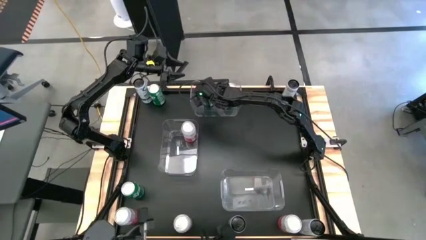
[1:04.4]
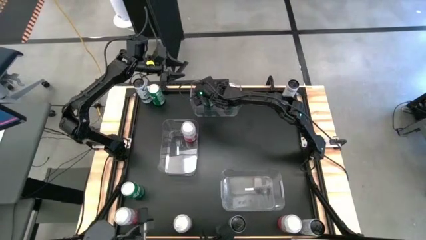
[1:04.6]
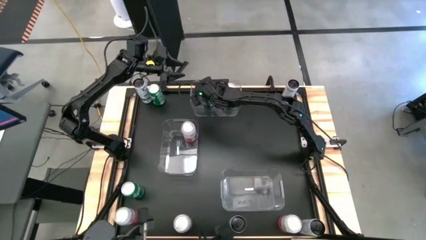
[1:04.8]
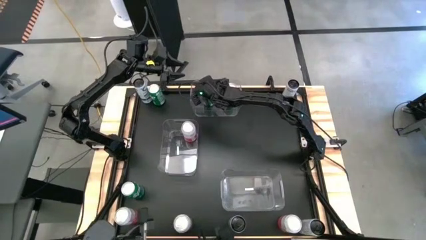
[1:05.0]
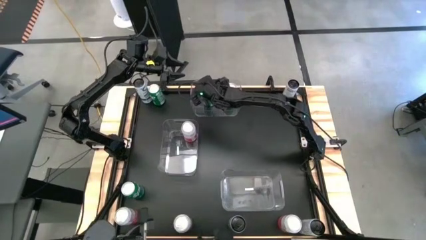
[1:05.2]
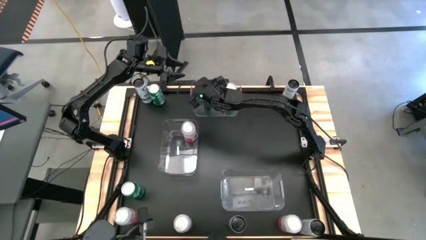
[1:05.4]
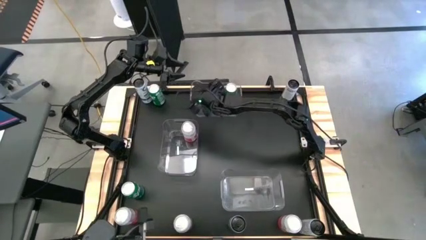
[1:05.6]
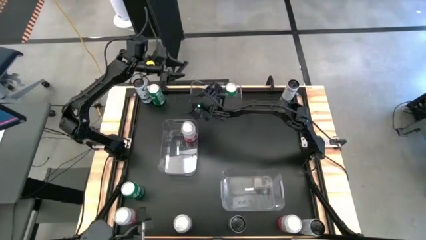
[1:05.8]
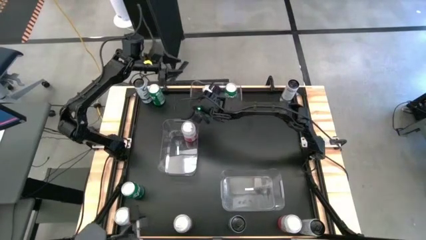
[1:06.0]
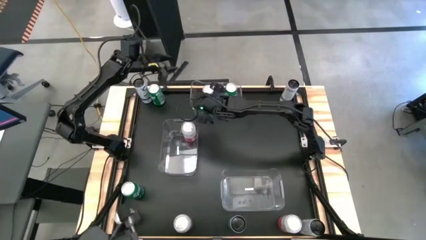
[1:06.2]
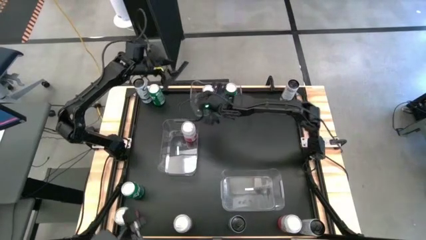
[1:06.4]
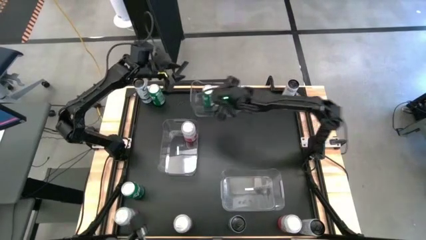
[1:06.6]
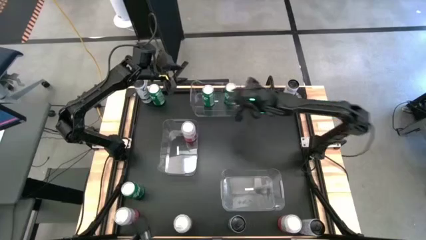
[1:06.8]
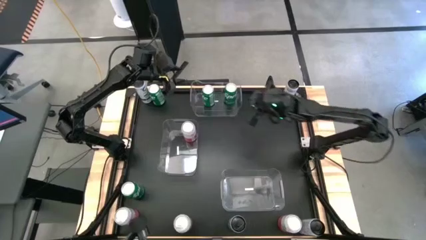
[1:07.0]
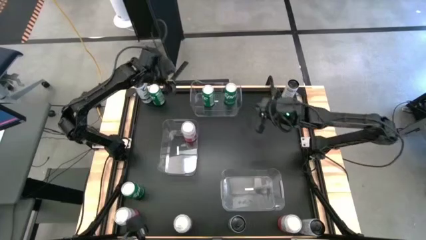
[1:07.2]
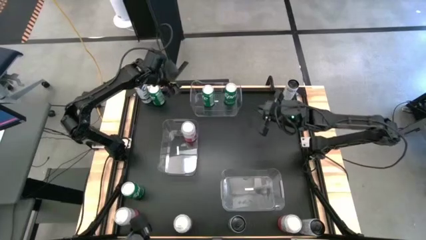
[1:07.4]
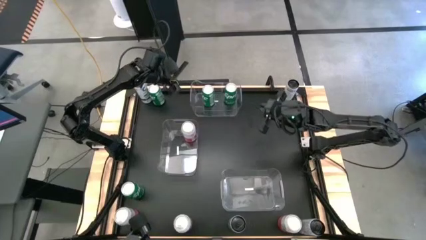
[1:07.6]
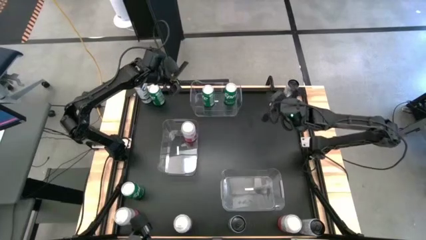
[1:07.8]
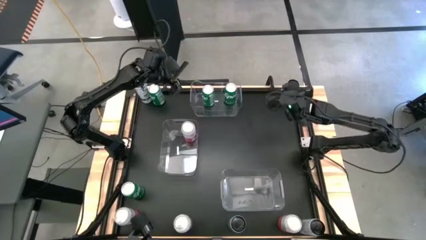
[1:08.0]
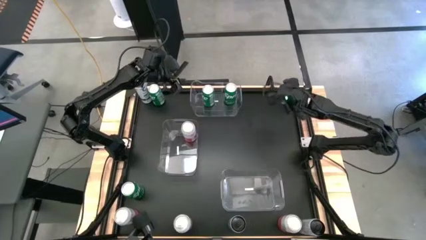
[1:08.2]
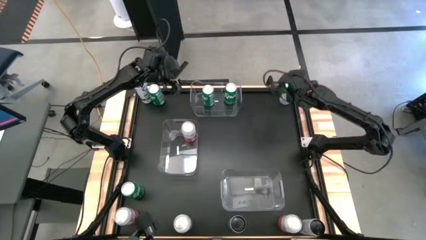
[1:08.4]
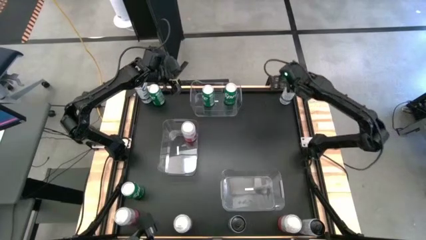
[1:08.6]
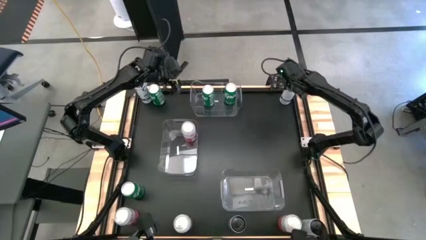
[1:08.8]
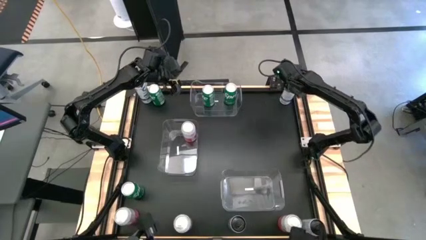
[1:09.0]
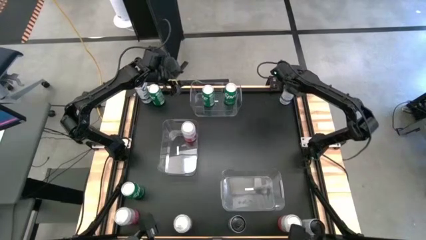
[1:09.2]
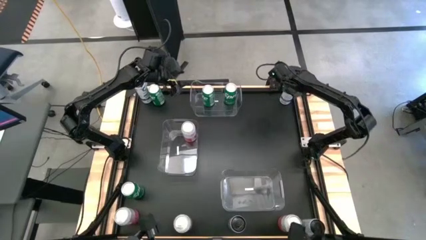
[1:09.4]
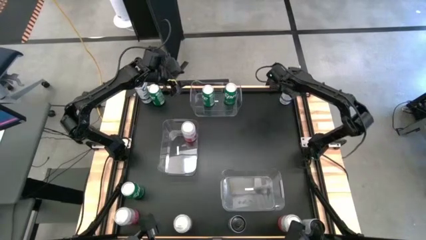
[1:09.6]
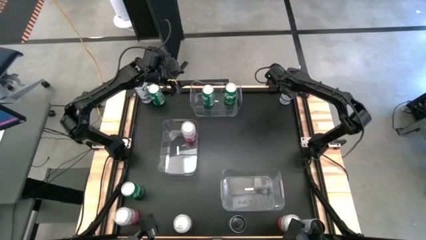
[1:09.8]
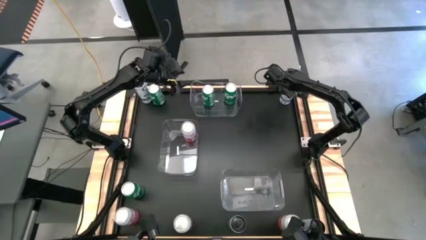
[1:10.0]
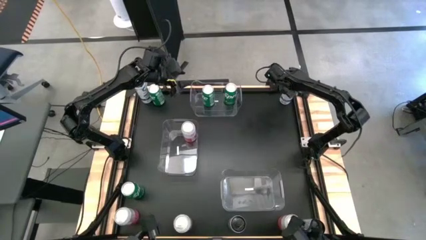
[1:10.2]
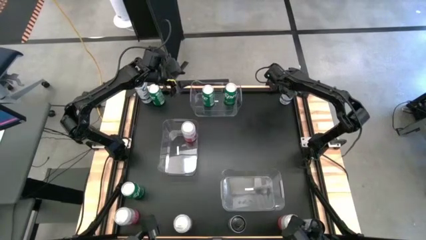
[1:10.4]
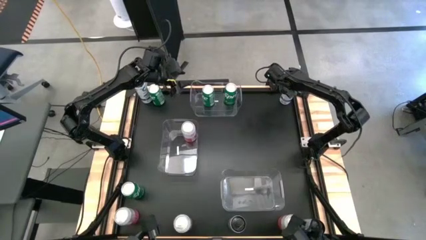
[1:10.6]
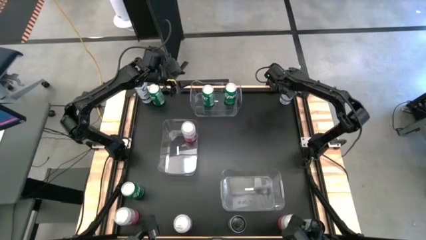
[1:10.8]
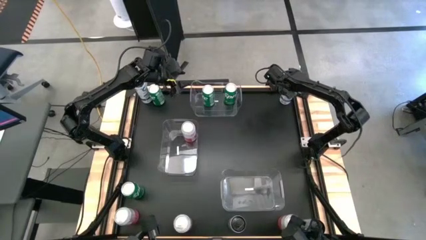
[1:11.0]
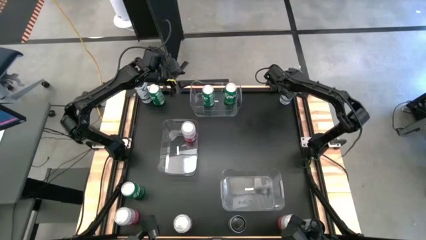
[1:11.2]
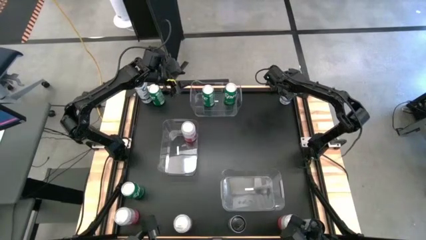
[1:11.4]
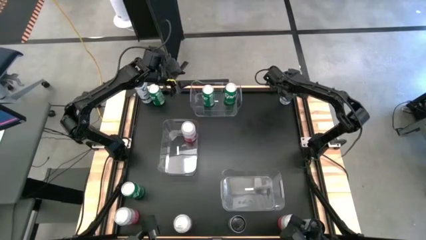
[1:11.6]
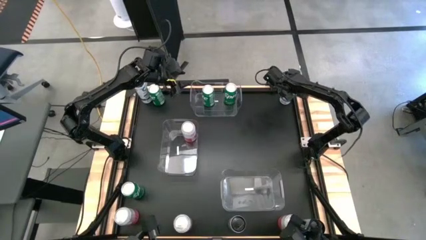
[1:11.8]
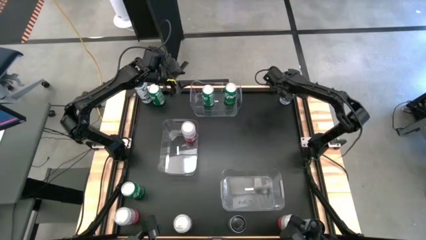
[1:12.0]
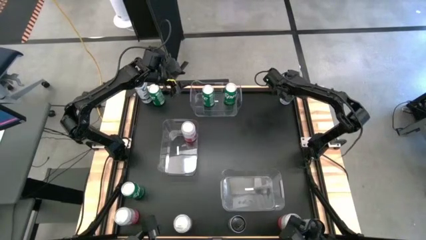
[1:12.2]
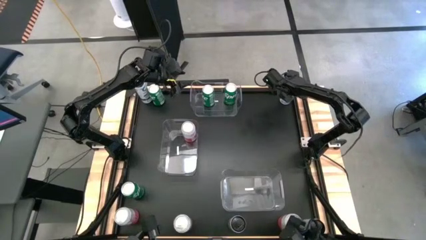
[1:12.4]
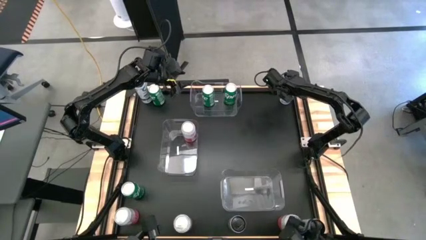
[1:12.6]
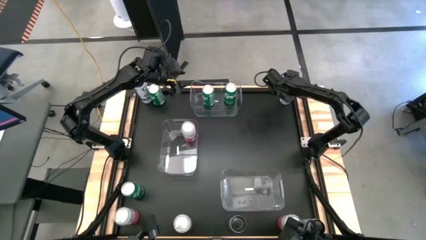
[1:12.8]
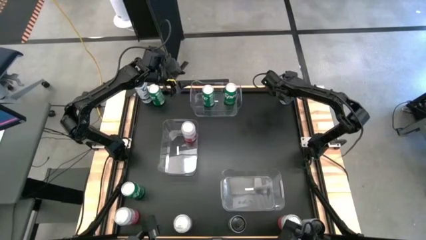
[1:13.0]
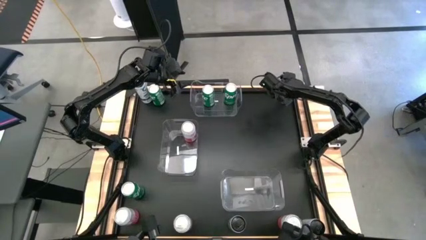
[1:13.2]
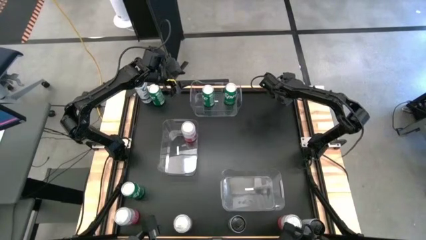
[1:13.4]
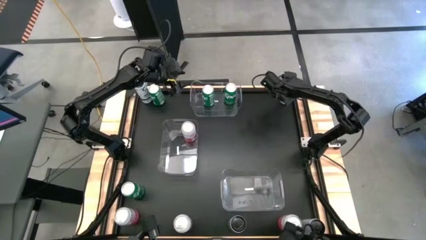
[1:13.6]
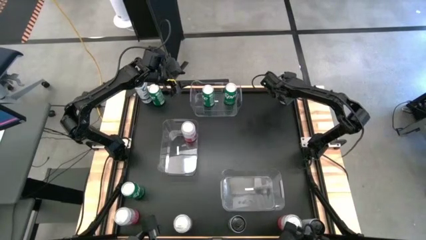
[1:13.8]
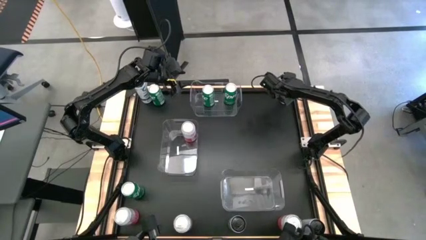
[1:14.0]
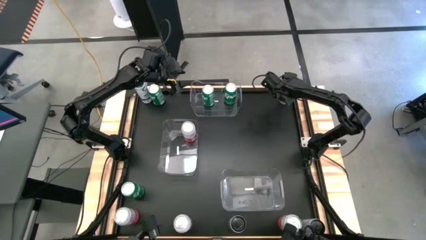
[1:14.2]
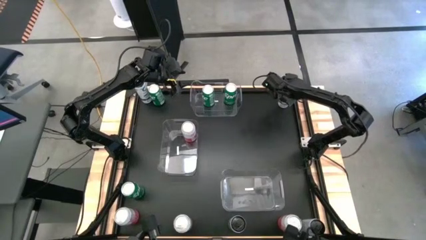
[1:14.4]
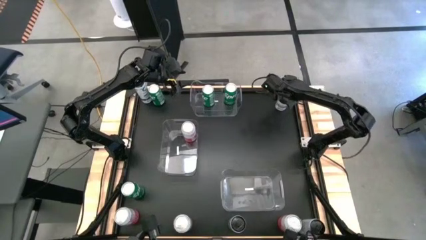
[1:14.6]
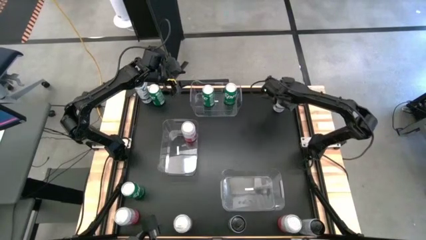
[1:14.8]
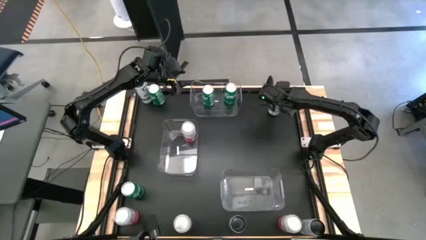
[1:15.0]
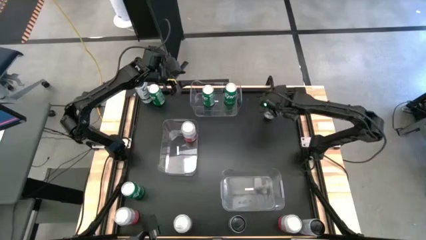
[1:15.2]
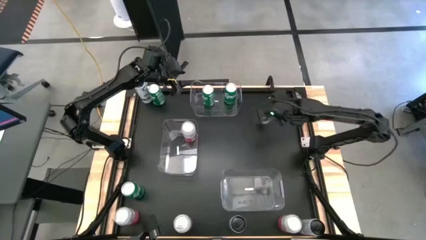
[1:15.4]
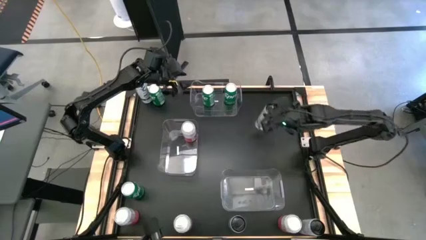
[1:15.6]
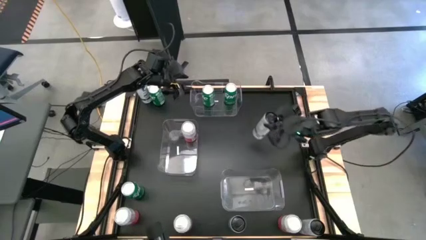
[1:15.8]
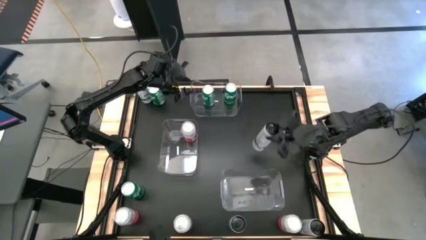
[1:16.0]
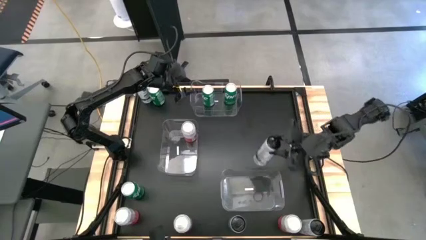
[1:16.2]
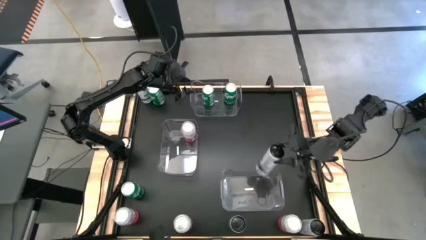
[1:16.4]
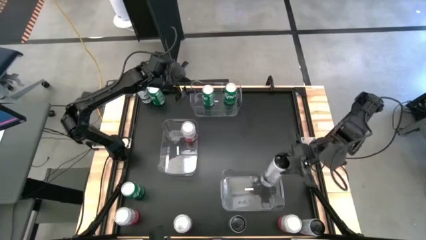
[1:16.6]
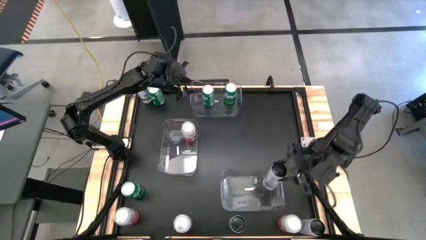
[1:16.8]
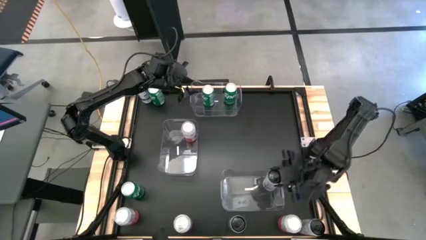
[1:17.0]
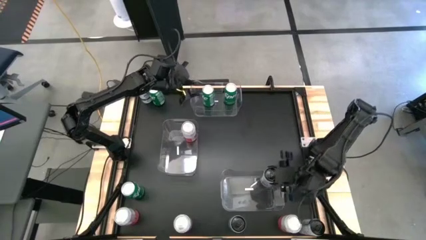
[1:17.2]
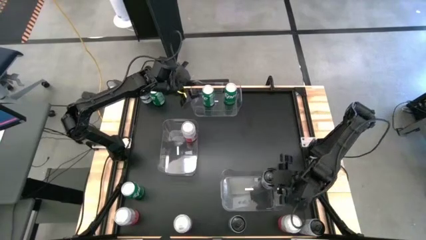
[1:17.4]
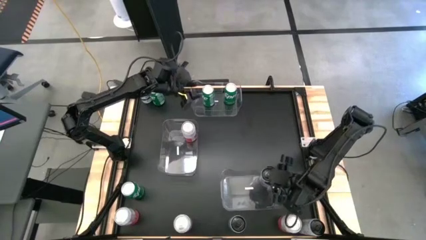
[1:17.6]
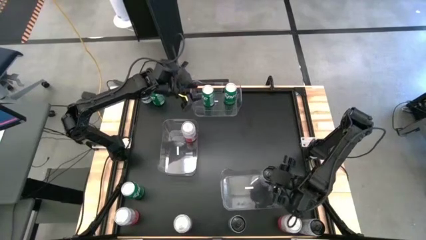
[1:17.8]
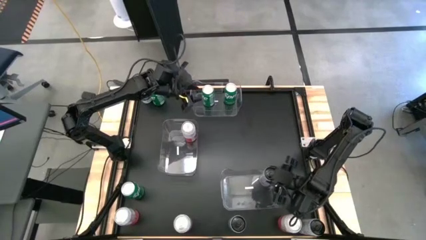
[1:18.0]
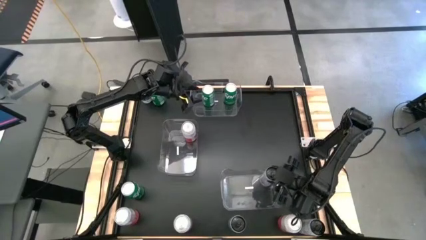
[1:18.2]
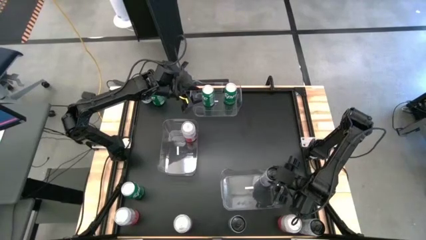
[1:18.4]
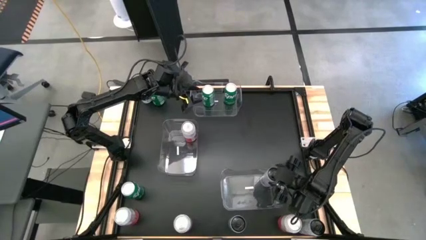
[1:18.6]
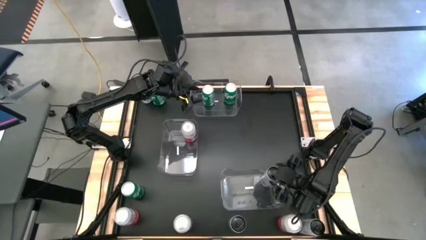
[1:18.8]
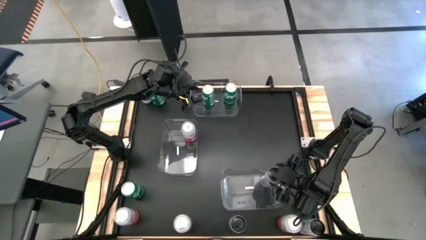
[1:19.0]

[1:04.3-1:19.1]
Task: Sort soda cans
Put the white soda can into the bottom transparent bin
